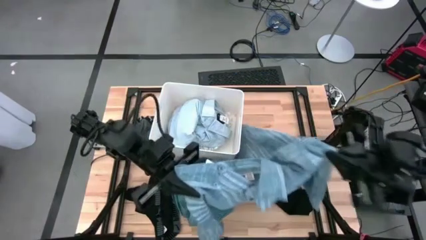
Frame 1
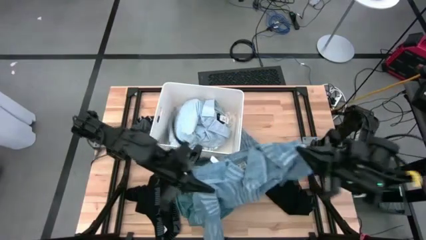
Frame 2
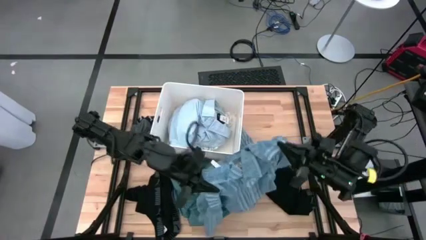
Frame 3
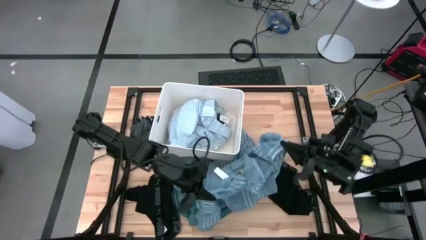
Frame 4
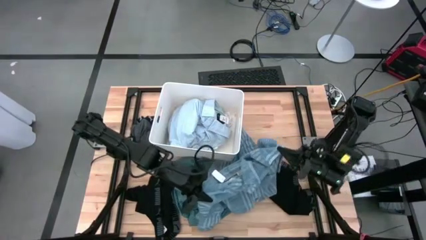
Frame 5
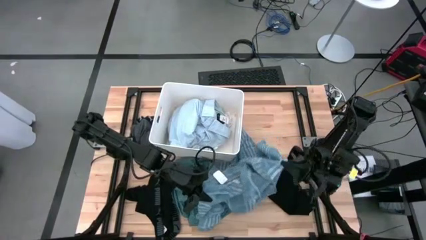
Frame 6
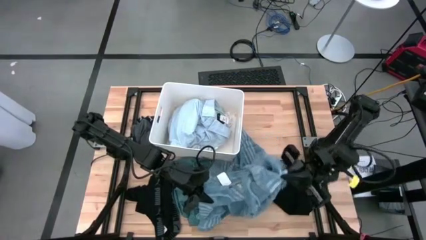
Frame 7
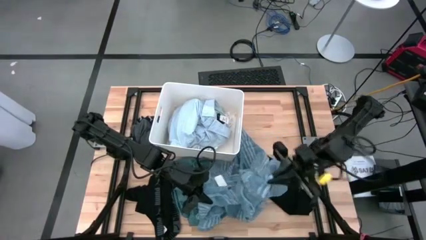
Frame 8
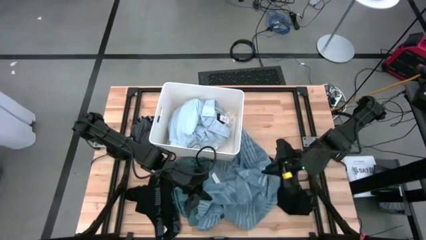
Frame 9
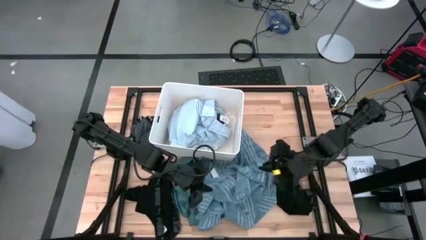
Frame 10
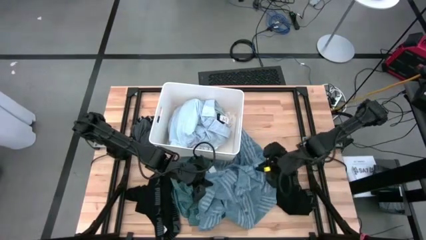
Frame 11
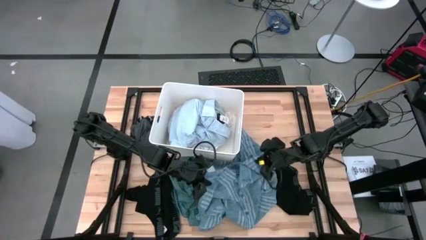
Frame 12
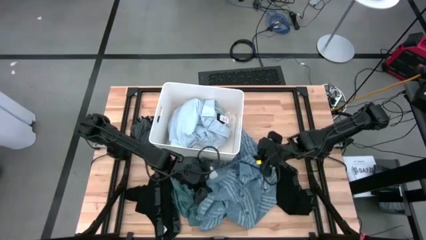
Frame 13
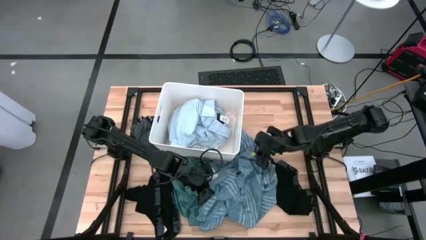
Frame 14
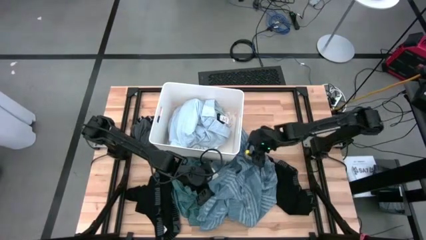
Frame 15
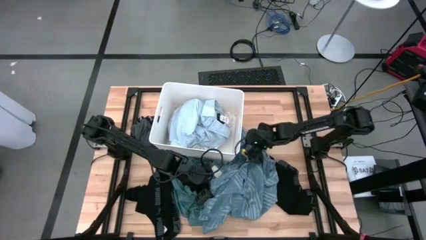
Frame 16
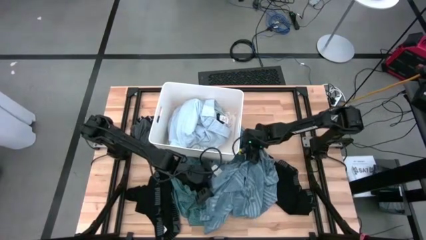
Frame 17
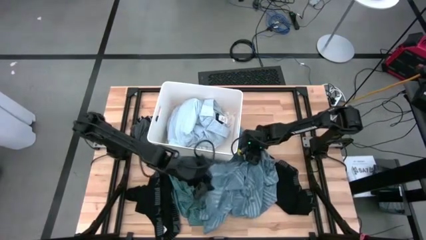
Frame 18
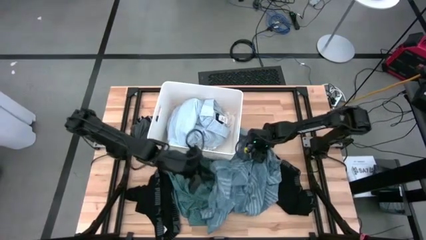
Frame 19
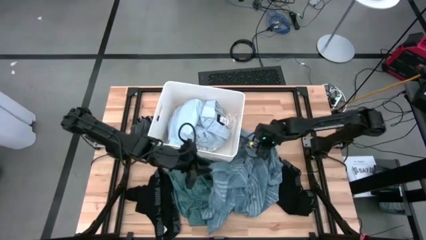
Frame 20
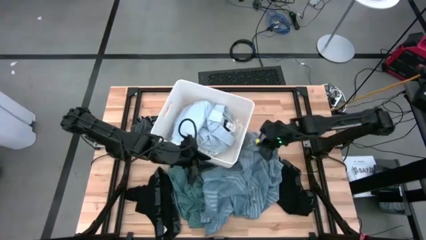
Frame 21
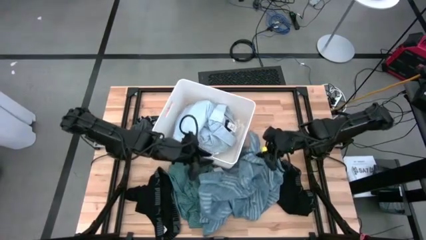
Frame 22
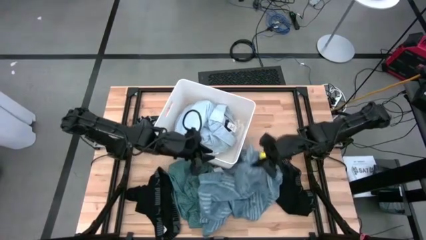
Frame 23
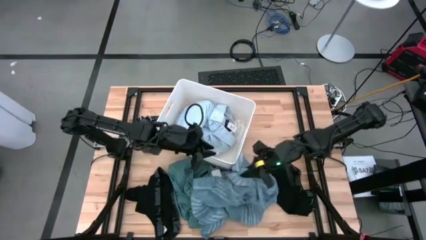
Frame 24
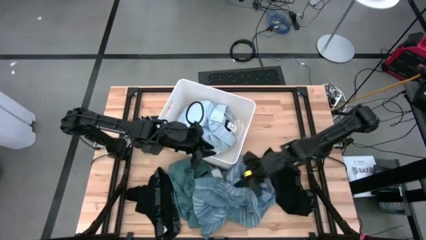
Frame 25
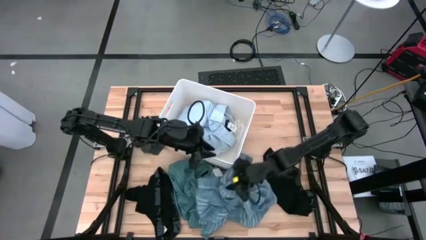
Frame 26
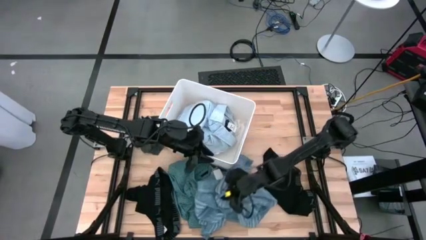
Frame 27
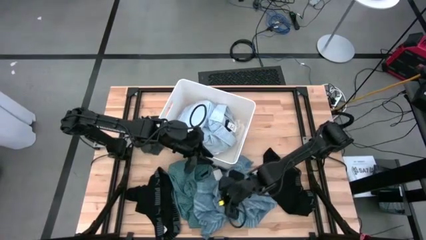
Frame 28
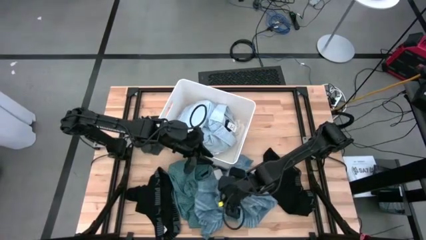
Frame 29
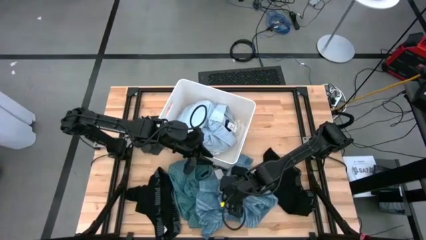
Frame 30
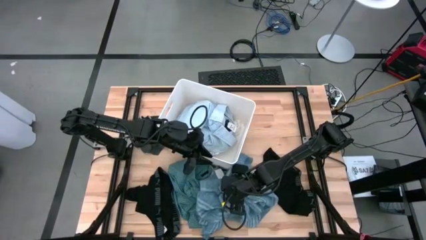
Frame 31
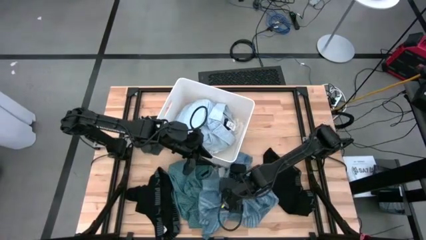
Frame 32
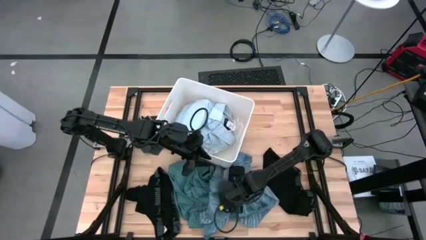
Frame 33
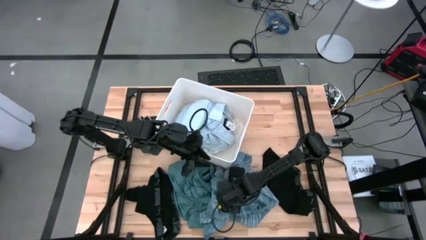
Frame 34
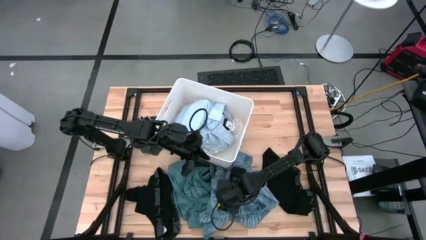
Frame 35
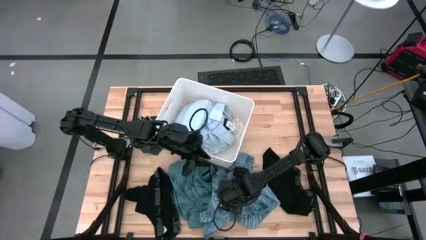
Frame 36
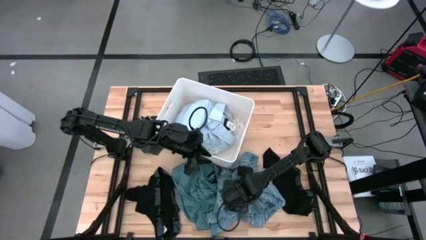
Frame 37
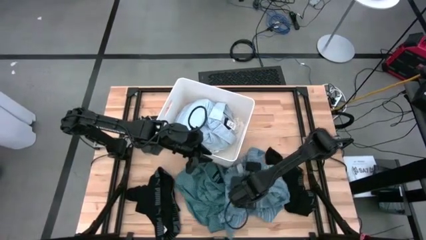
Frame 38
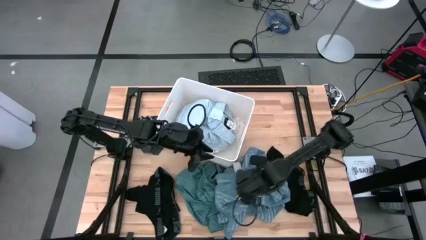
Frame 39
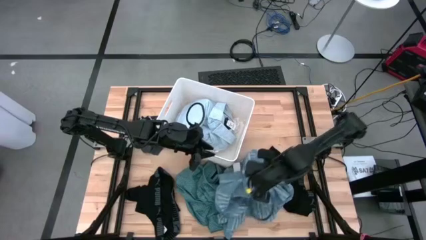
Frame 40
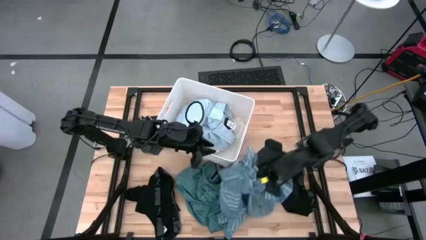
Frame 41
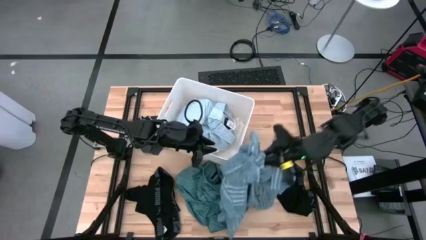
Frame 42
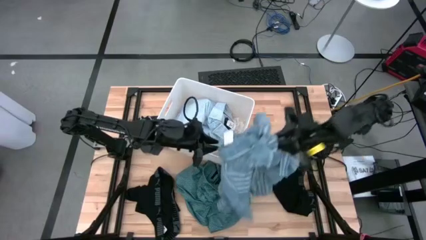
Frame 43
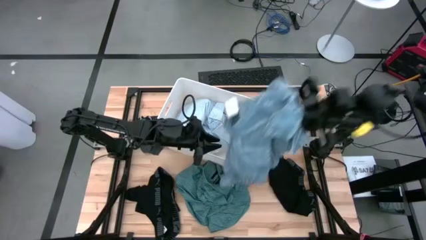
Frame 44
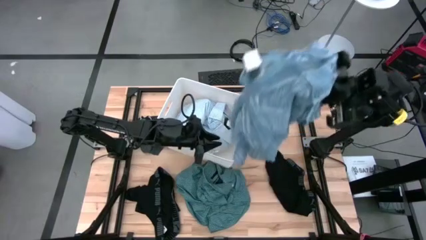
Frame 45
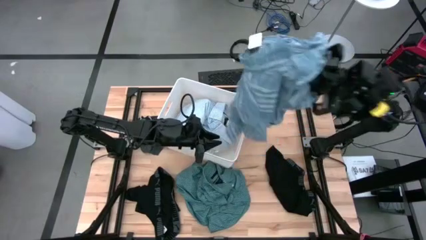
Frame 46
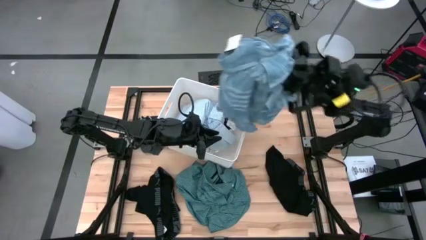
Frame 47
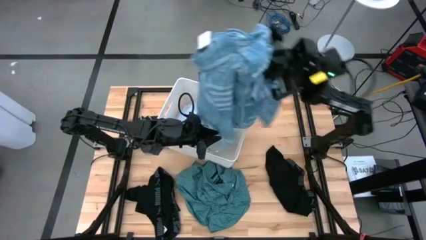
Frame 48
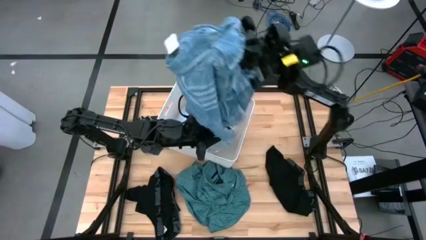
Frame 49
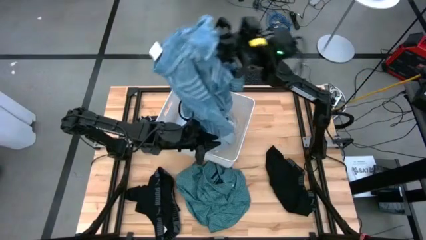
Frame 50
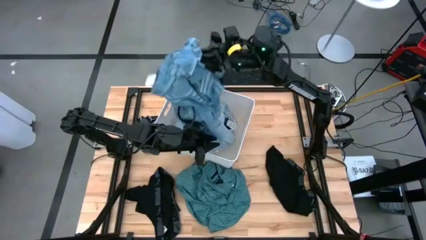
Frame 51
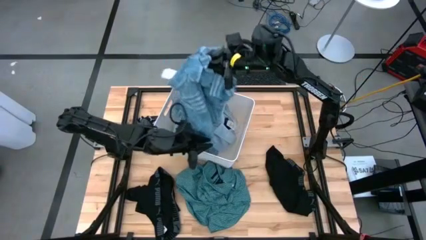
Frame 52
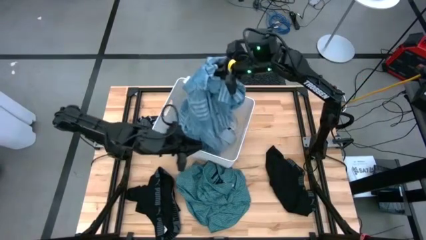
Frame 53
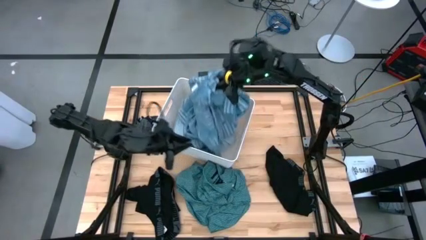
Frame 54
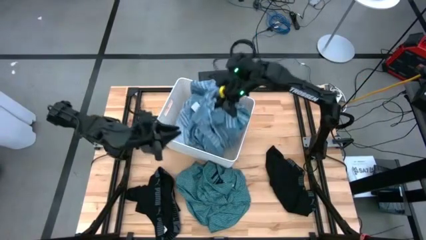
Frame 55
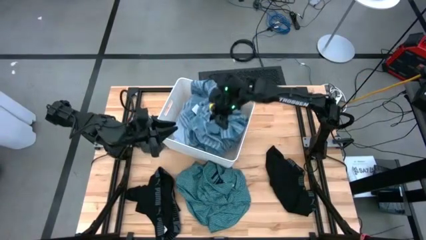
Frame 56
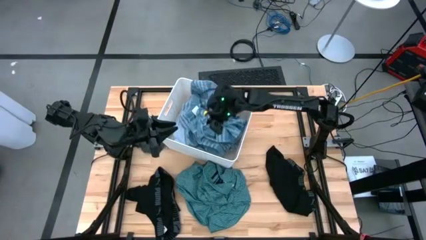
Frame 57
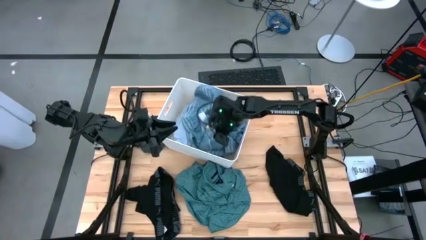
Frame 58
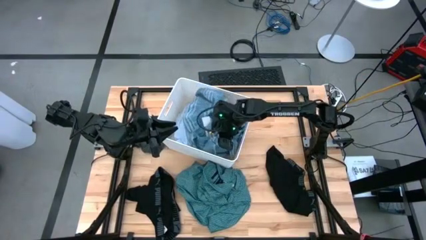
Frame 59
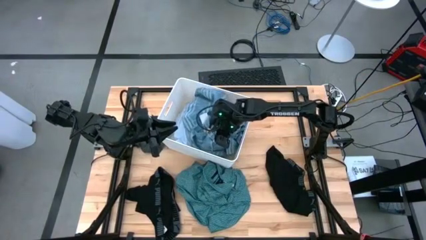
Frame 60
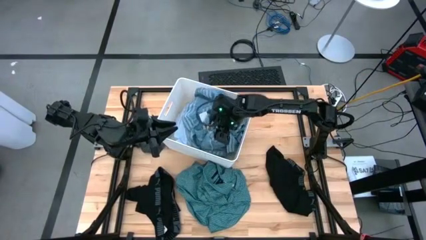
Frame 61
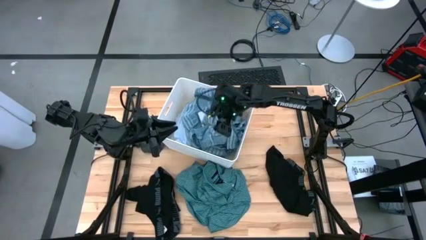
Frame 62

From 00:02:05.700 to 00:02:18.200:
Task: Sort clothes
Put the blue polo shirt into the white laundry organizer

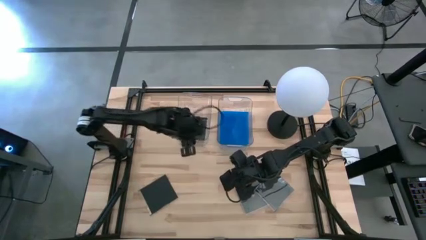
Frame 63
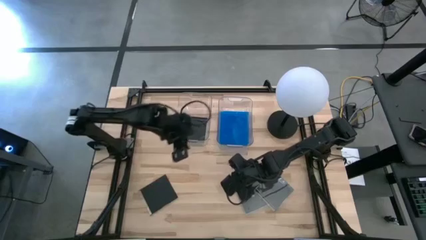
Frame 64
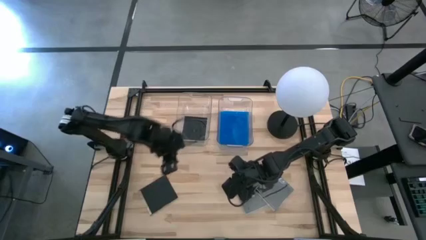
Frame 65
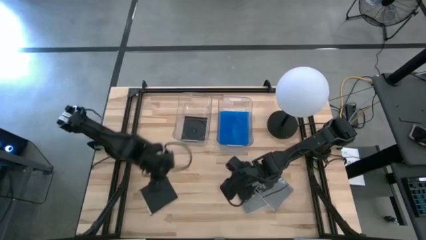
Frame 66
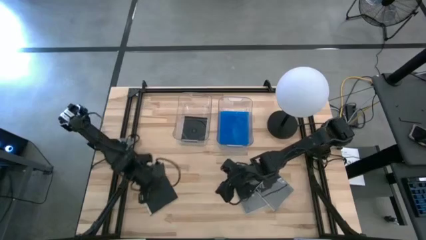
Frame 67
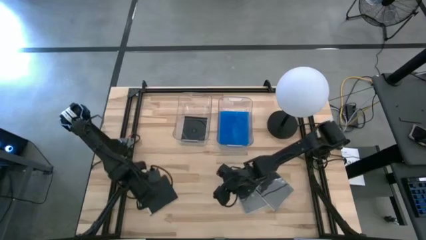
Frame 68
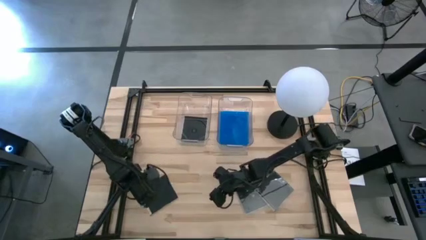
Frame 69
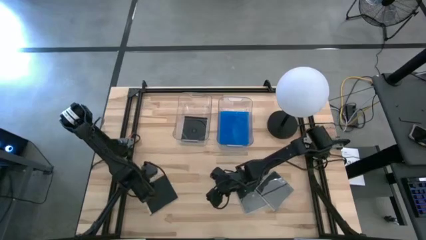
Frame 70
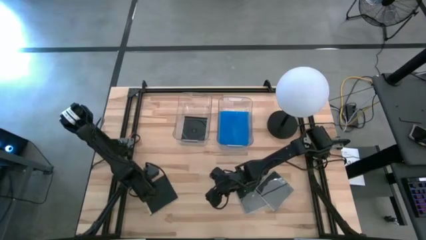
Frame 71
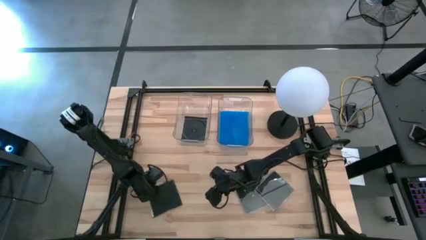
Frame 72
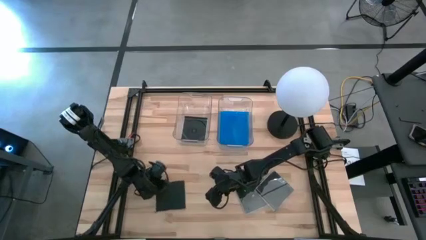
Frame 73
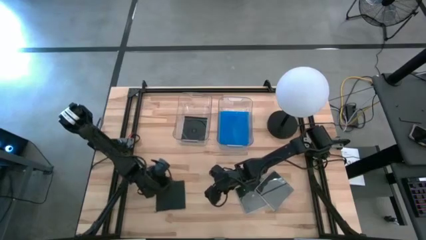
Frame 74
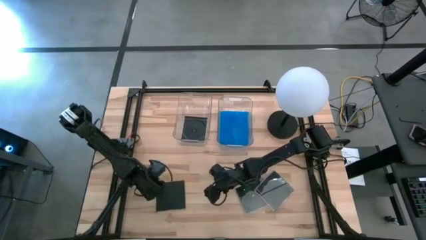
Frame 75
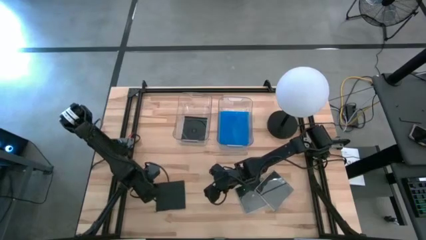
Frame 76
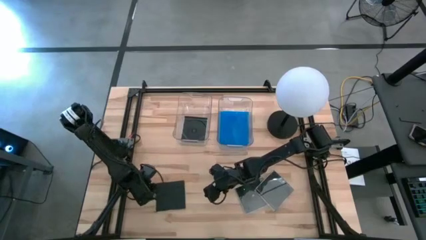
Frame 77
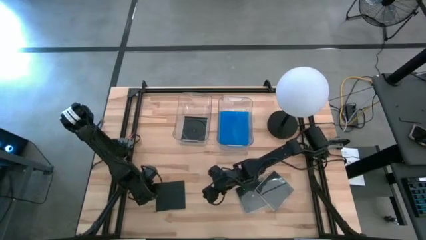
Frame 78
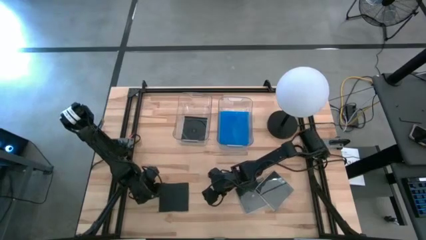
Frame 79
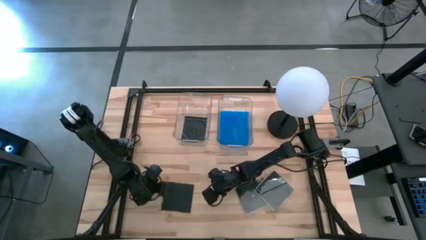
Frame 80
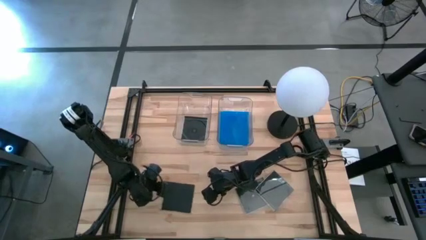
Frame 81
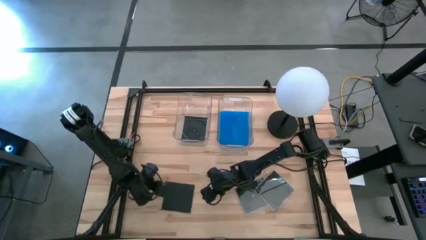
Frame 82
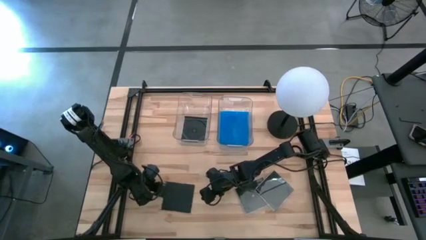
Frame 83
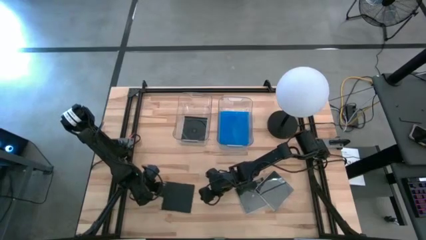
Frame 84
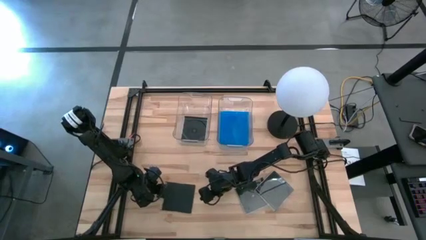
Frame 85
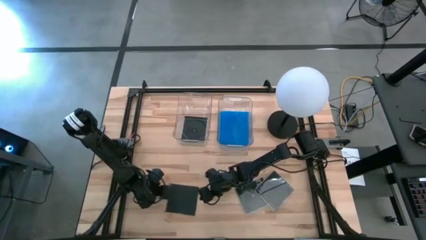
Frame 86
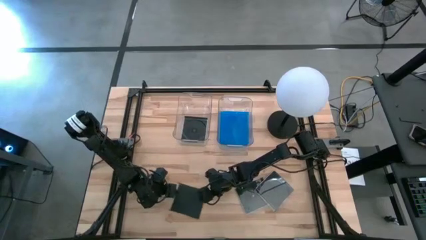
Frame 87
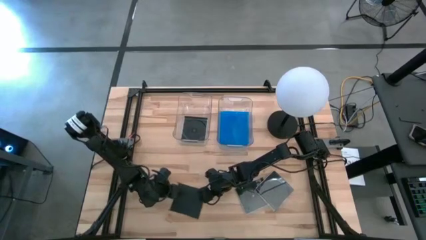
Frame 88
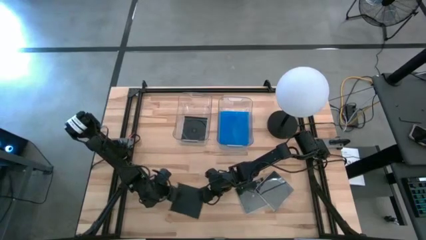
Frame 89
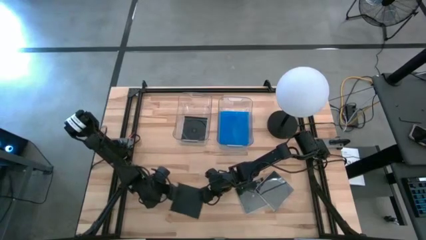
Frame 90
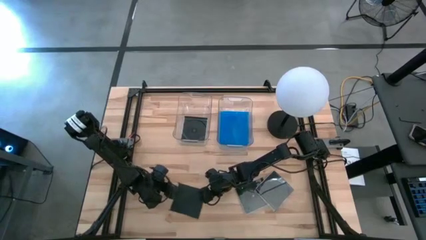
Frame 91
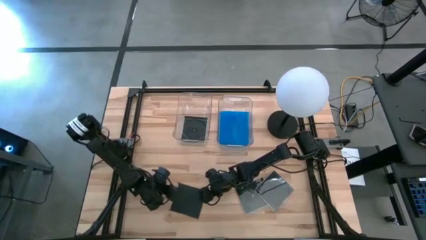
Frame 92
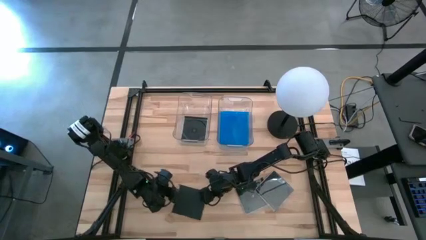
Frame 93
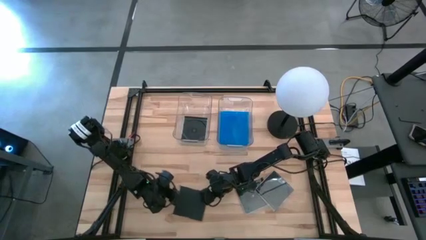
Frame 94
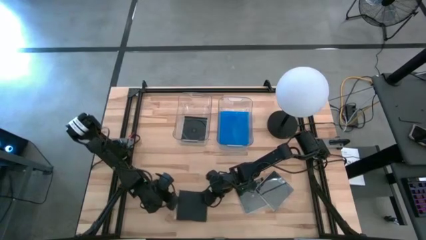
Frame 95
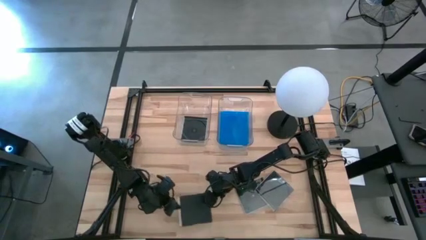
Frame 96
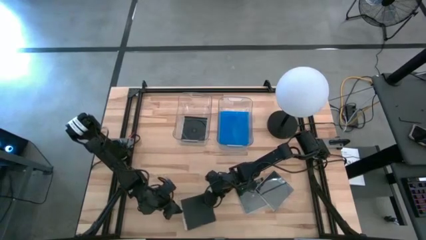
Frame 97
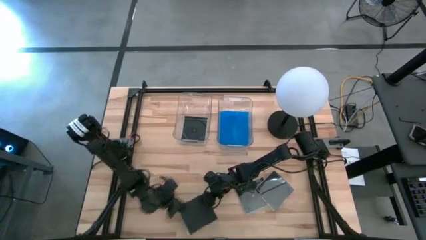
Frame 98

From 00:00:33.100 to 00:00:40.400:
Task: Pick & place jewel cases by type
Put the left black cd case into the left transparent bin
